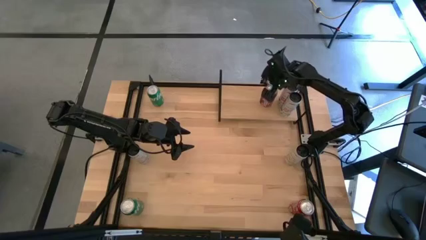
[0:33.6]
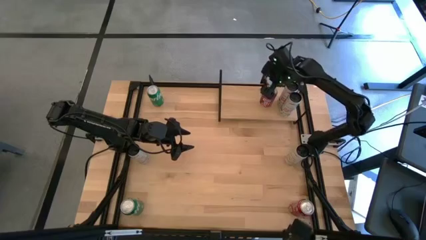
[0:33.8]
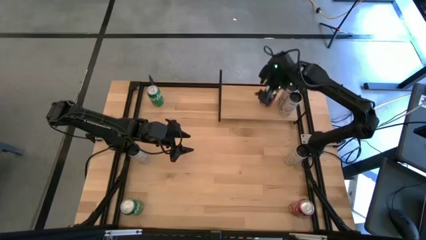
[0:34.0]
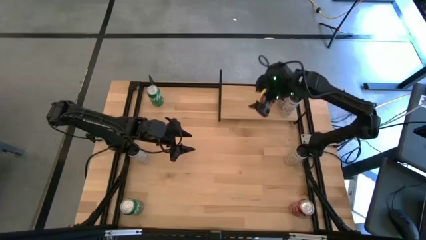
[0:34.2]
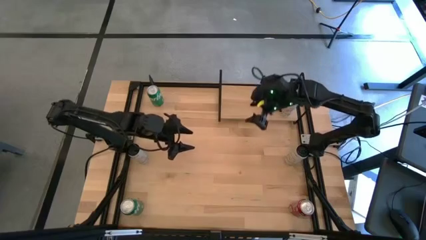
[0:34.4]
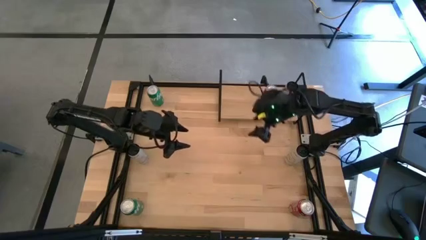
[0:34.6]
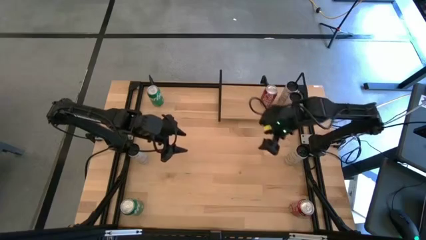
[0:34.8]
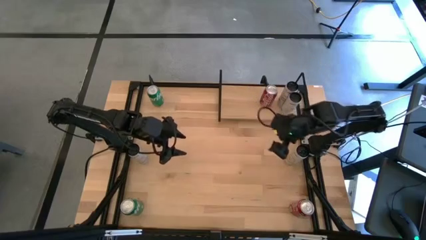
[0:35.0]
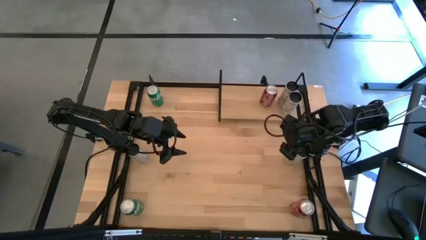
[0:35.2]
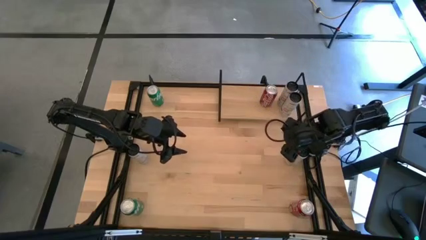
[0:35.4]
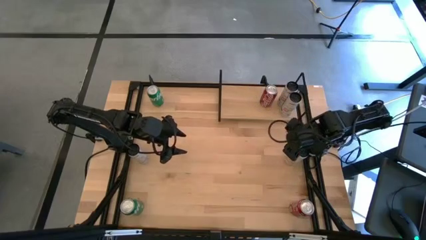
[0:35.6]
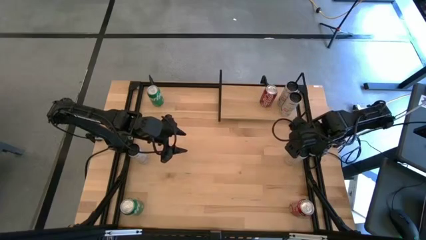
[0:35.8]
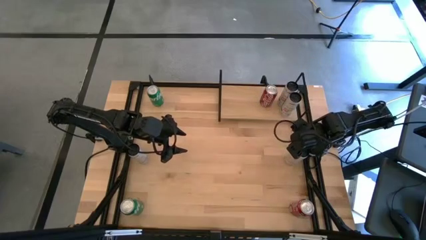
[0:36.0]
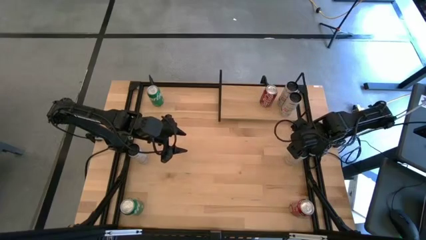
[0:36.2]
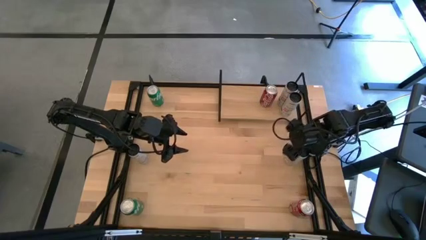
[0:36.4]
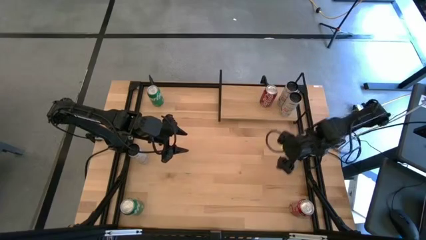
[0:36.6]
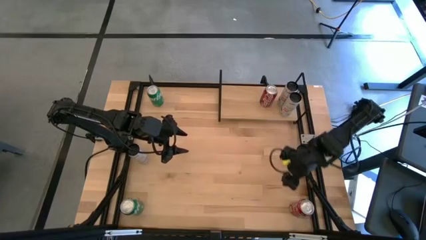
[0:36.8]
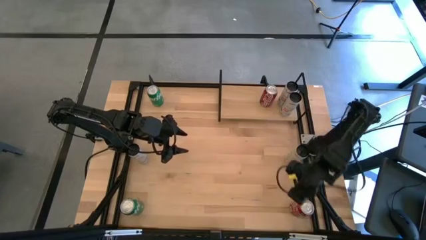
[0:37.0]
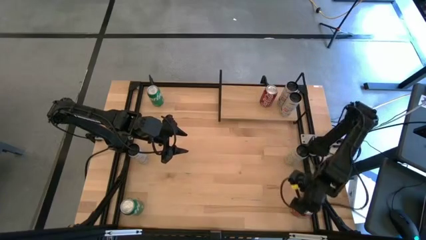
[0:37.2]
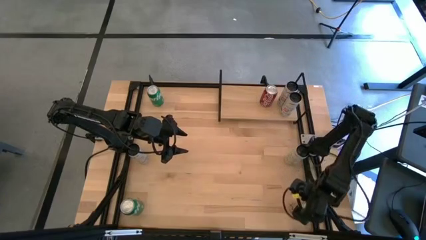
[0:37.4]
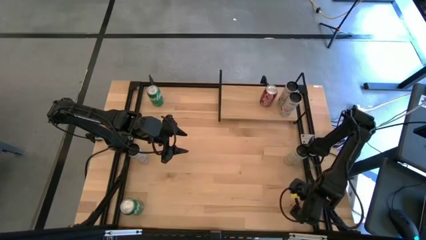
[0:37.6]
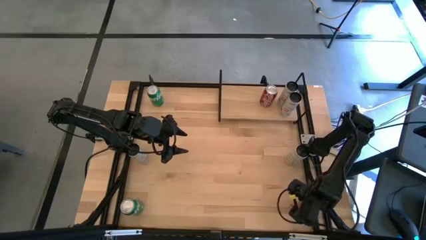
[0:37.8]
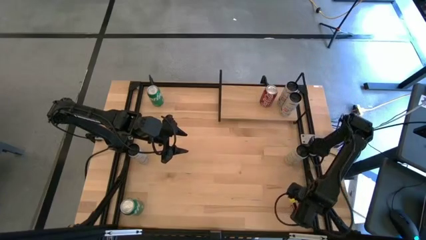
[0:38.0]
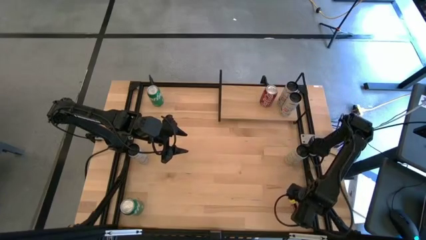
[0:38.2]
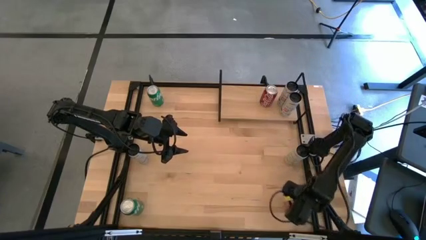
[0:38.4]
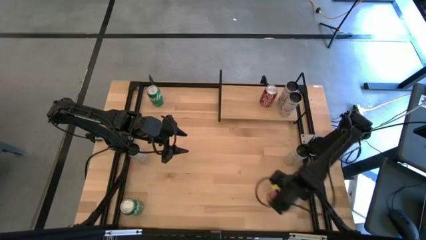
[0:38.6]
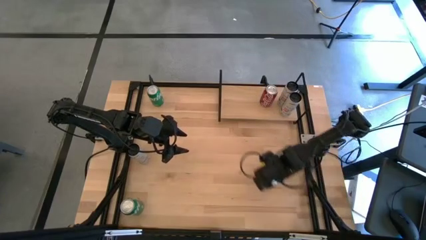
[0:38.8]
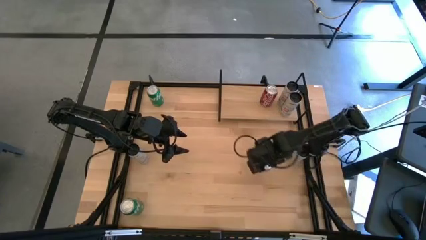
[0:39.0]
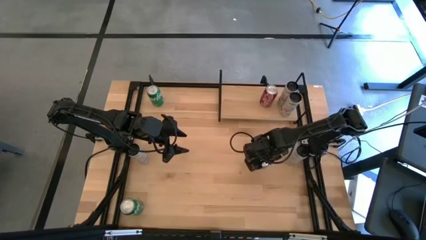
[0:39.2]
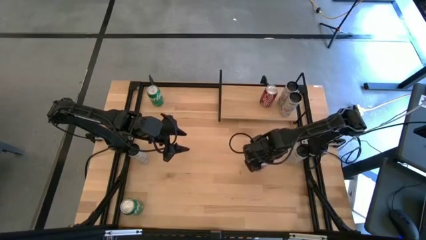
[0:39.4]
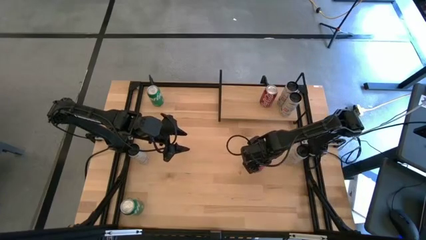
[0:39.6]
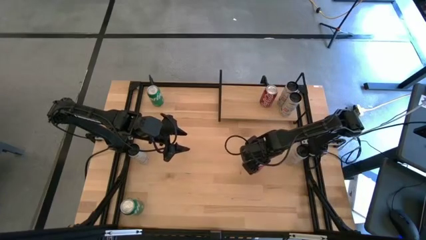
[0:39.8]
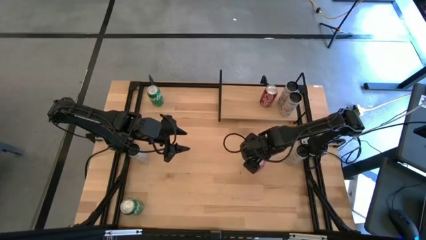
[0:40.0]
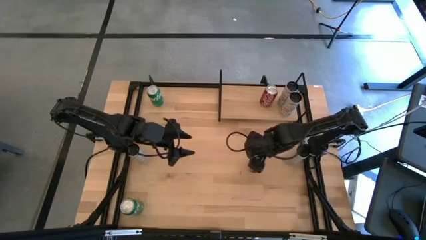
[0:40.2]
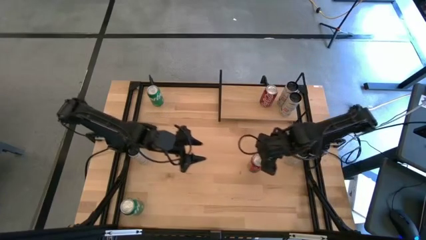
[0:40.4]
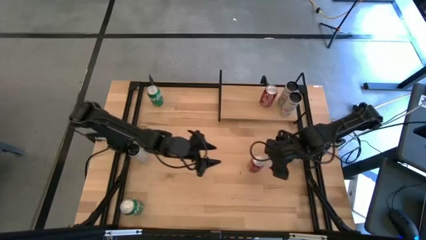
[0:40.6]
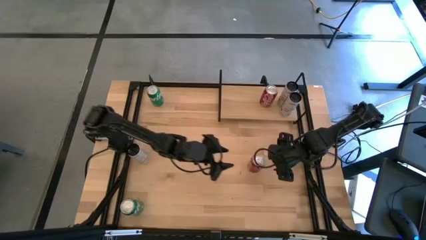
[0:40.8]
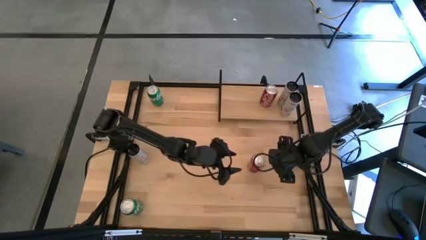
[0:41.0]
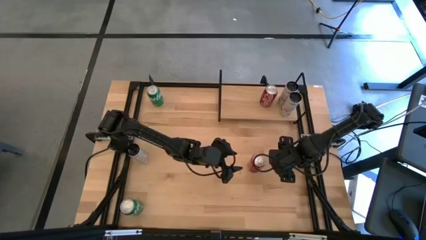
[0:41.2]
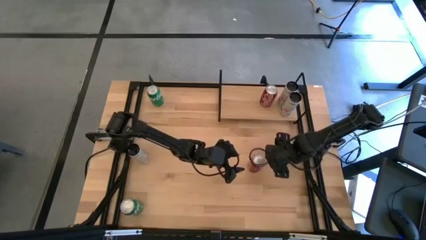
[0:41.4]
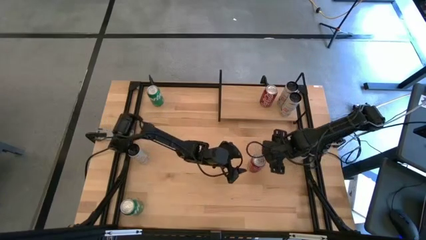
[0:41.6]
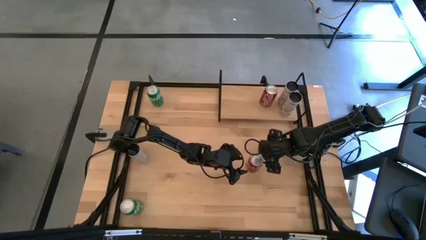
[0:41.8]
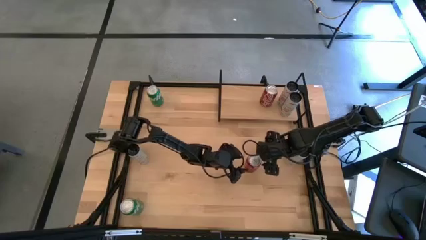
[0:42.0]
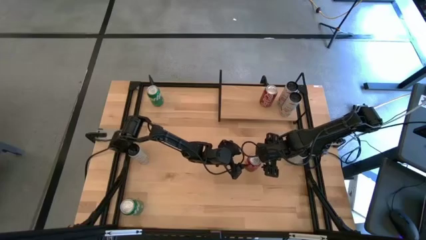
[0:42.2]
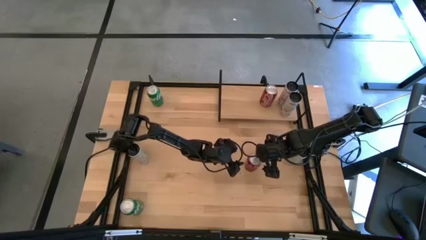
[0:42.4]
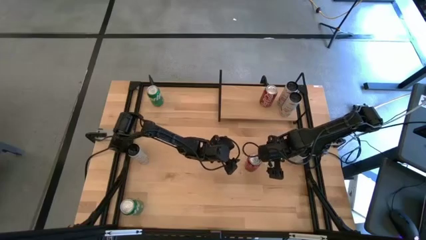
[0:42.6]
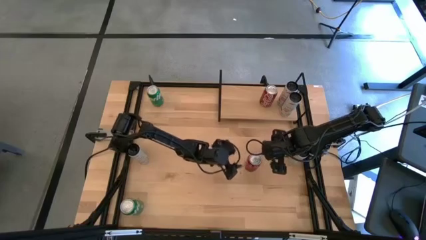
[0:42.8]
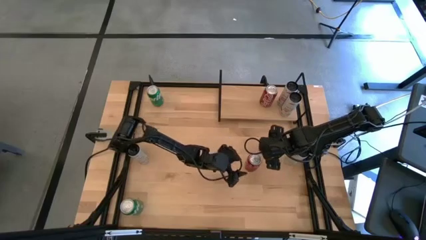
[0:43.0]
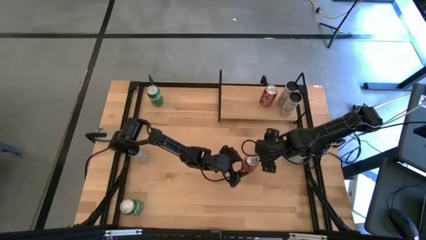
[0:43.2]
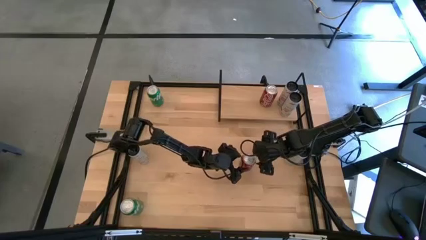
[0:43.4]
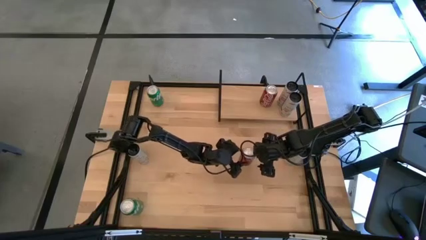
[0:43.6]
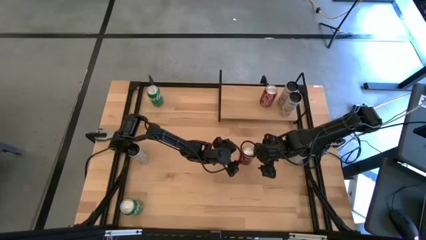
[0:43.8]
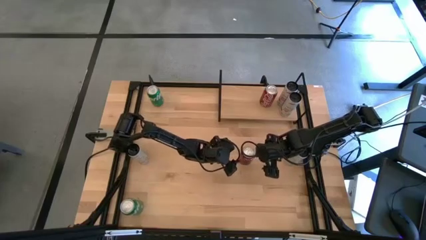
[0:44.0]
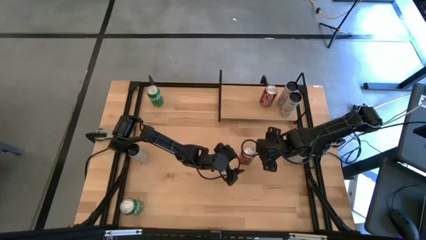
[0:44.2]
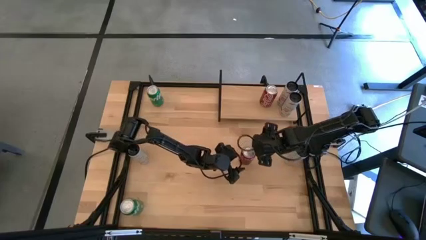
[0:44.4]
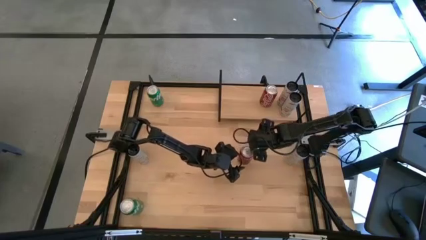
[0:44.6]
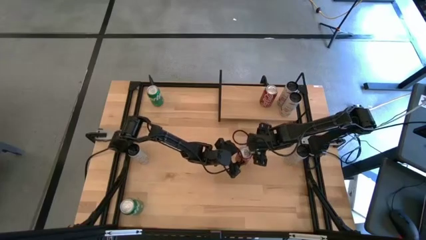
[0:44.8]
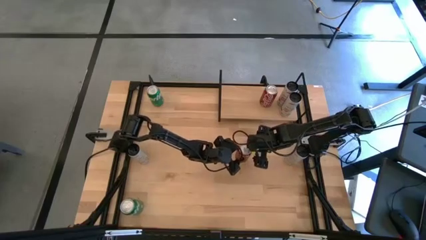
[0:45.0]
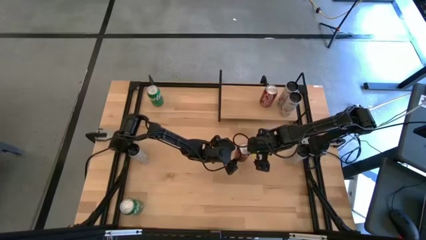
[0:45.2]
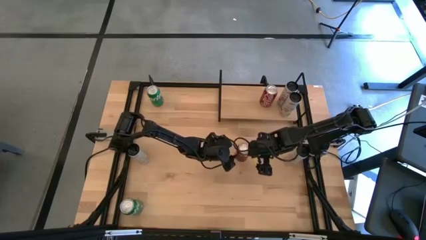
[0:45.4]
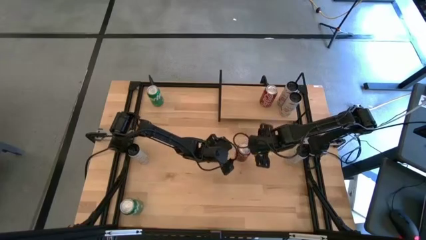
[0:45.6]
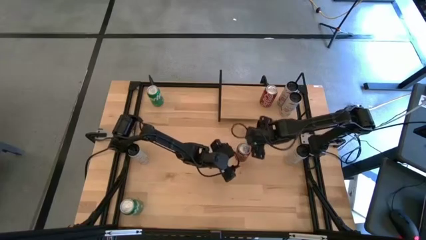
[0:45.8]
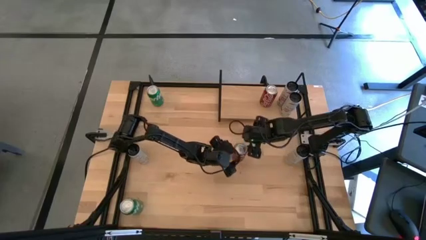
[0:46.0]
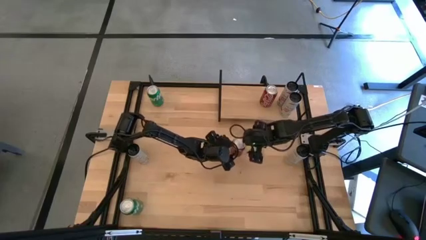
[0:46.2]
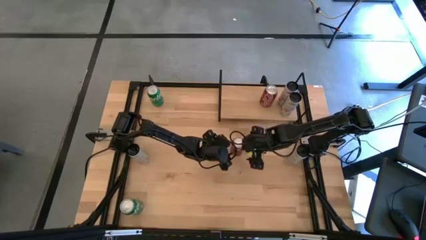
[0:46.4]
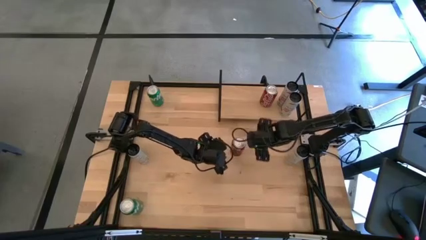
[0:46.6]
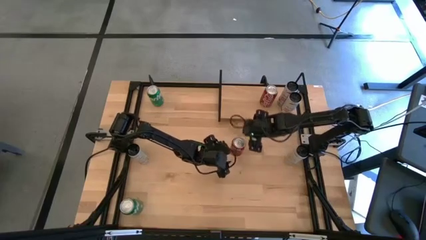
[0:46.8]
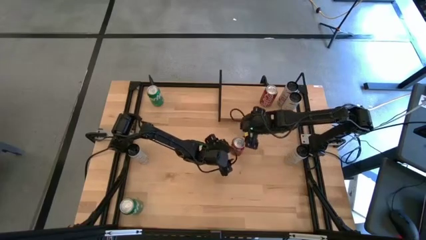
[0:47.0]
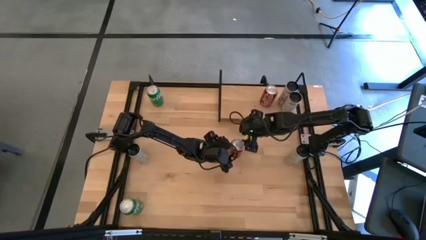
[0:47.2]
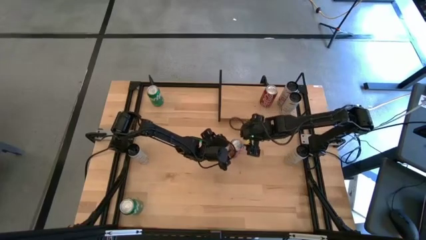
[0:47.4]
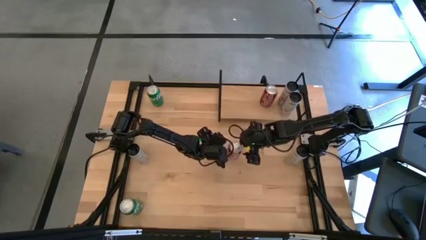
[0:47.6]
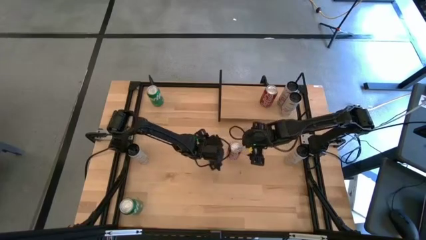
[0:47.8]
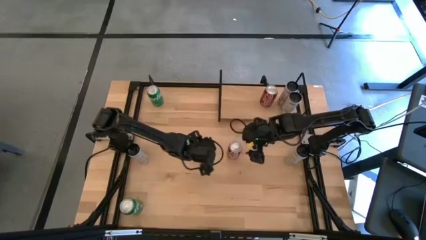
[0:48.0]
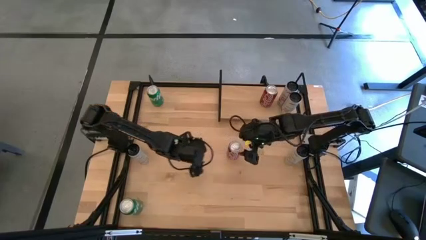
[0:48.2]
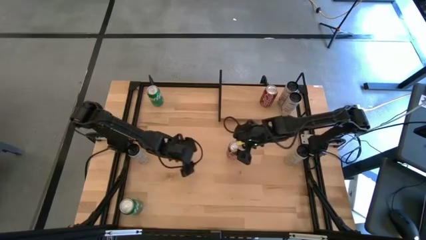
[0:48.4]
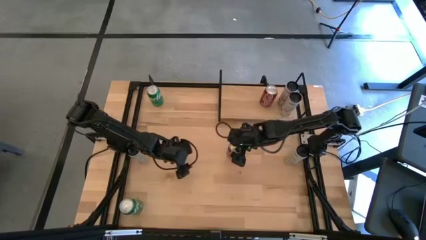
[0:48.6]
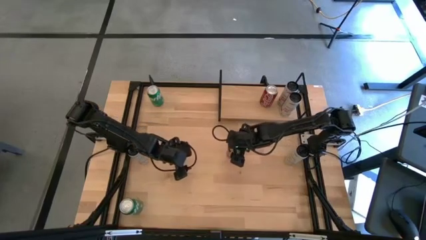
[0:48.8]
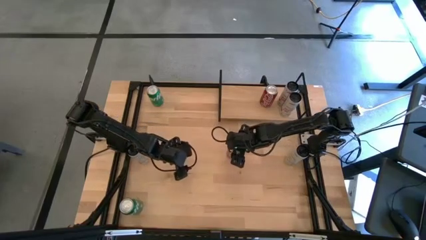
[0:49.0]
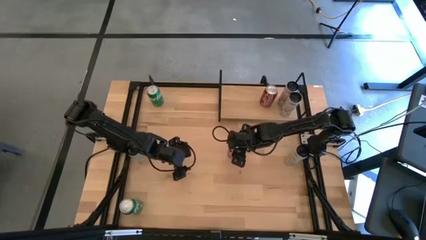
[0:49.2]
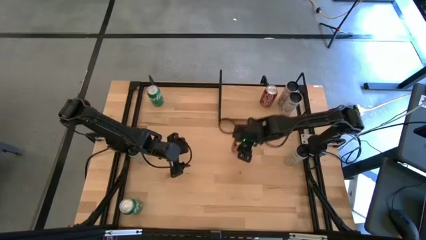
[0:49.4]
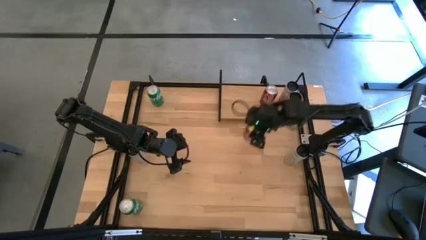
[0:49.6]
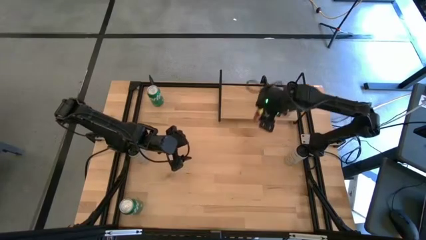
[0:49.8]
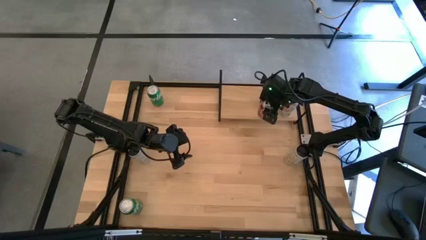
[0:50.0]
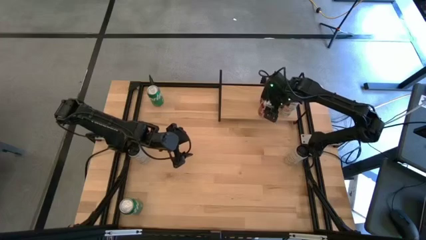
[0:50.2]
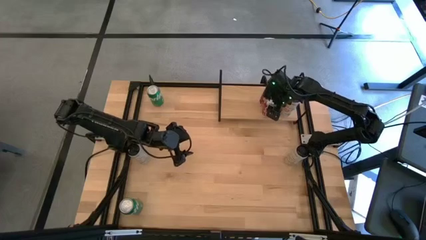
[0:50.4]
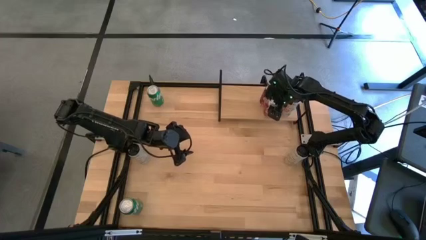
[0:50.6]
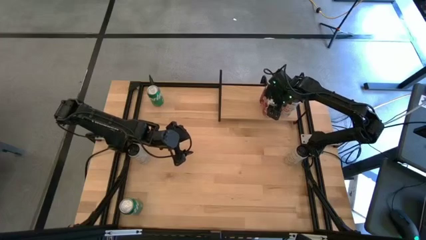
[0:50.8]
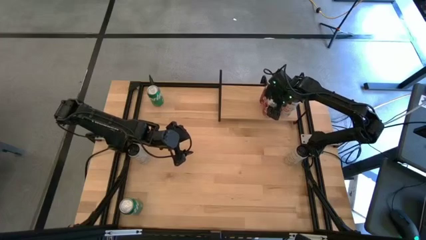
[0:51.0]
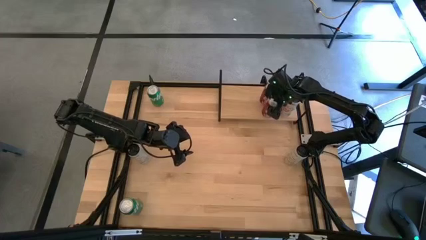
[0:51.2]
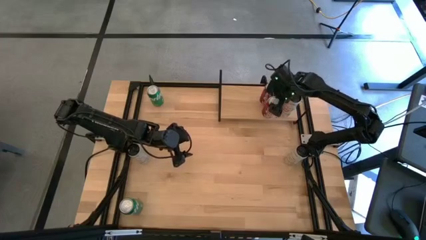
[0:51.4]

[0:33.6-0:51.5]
Task: Place canned beverage on shelf
Put the top red soda can on the shelf aligned with the other red soda can
